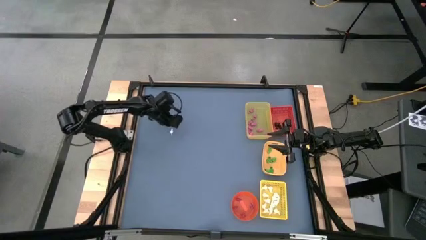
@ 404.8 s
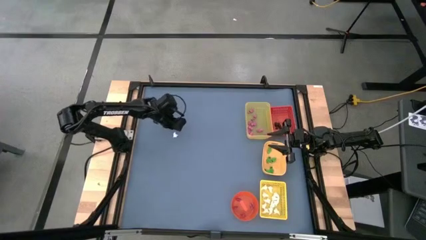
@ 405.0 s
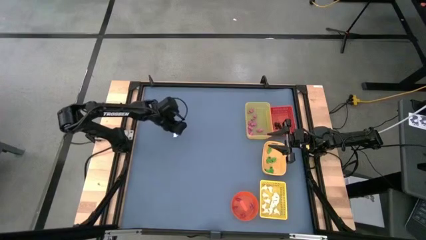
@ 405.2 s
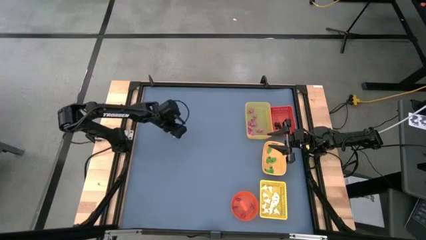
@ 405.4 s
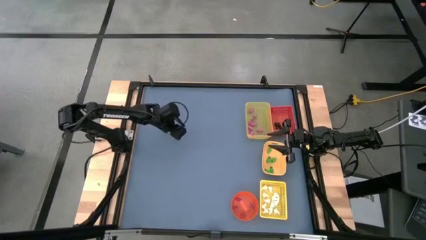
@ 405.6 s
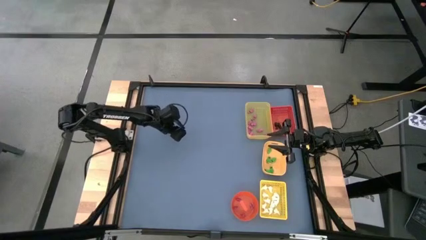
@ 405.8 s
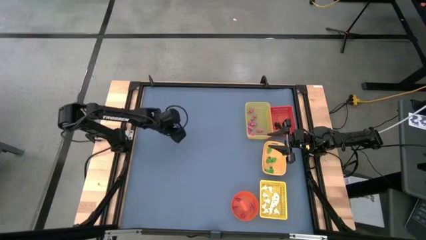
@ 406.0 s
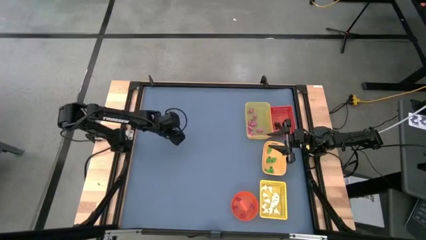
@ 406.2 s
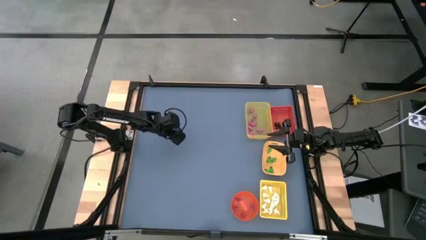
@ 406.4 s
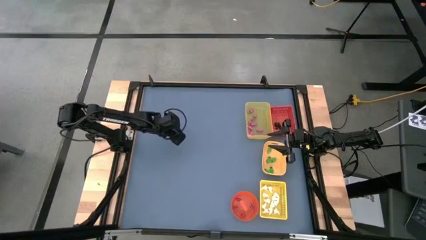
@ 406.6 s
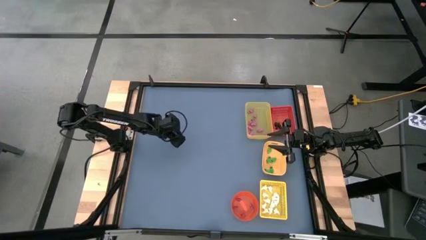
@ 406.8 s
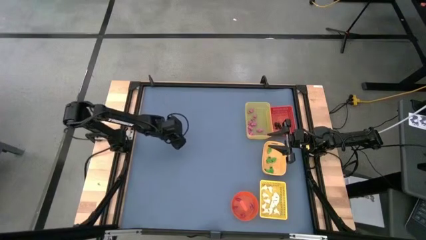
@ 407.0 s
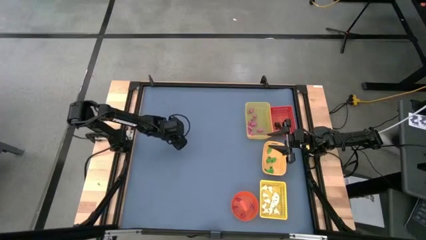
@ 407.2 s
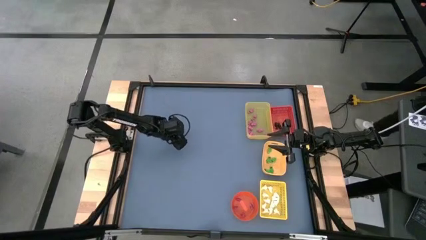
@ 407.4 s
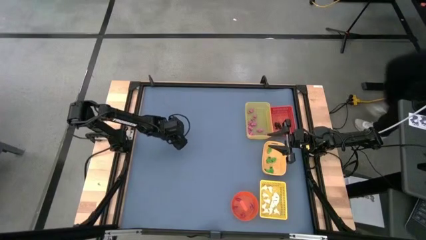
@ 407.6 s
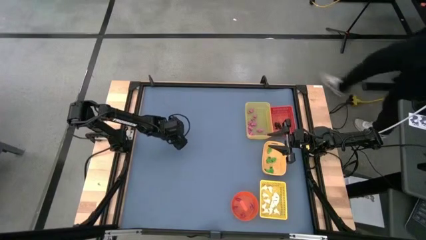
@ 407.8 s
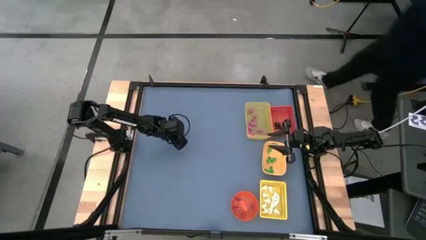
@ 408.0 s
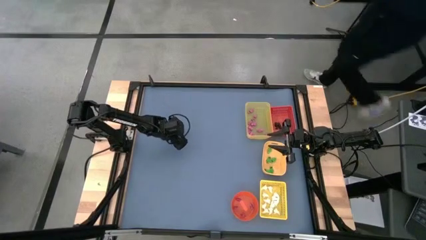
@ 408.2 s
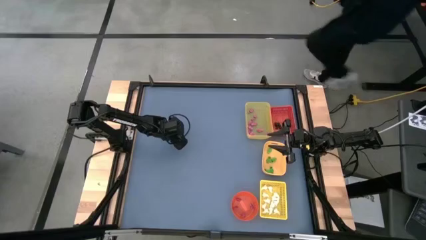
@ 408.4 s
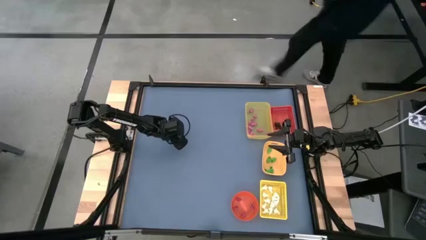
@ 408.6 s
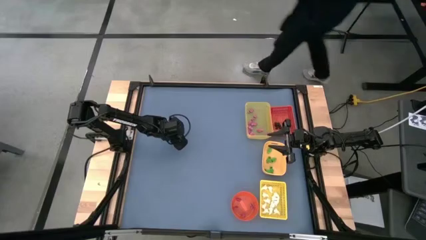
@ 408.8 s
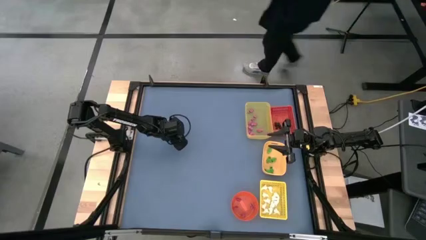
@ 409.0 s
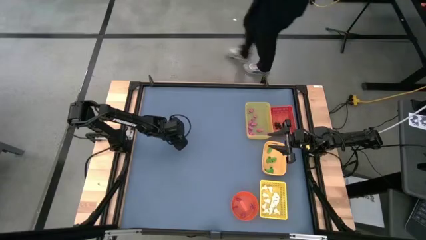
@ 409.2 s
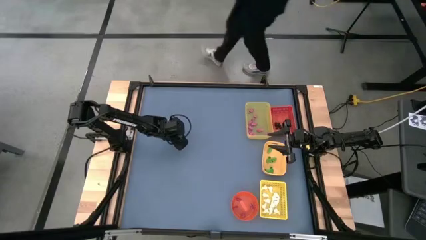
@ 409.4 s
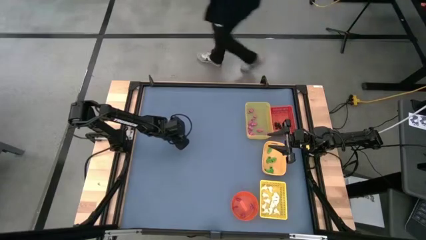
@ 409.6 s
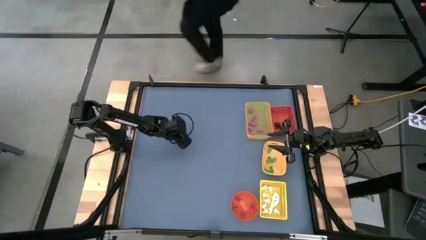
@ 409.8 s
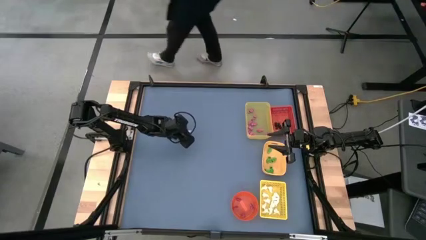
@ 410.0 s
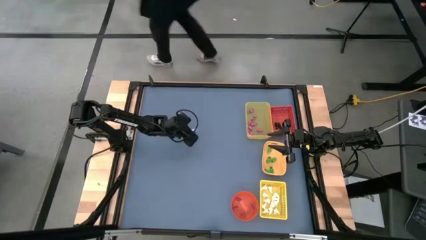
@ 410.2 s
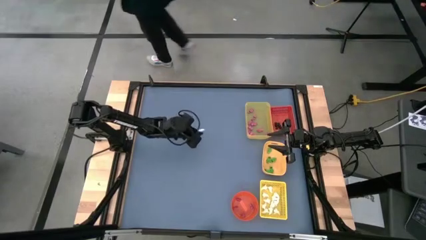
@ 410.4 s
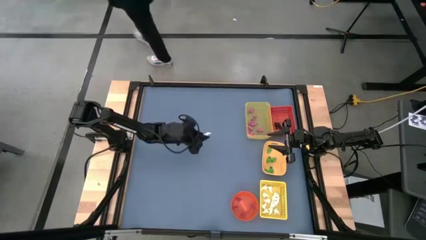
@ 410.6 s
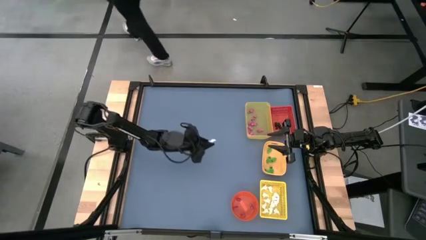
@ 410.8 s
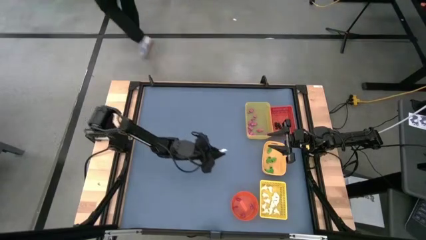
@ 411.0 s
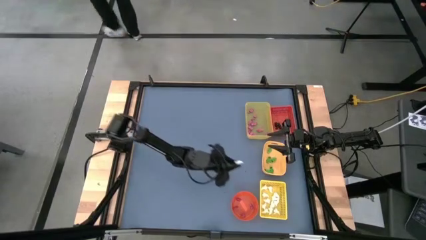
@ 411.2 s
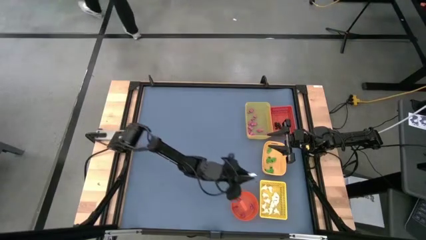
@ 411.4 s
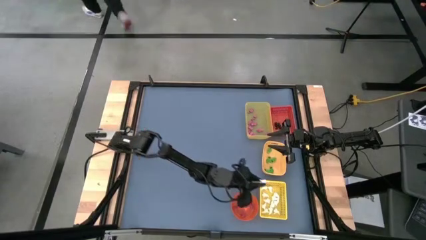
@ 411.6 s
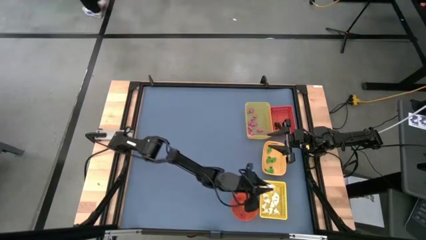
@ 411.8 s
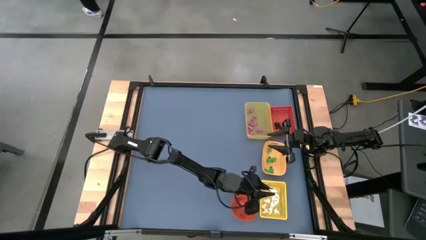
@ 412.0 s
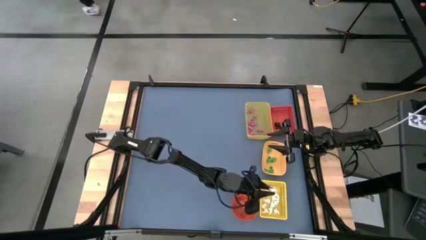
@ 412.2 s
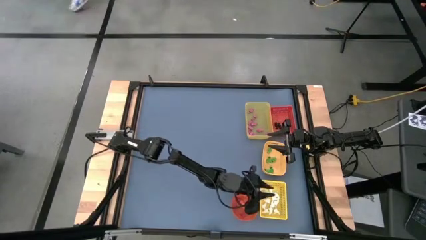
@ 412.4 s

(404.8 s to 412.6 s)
Task: Sort Halloween decoration
Put the white ghost toy into the yellow box

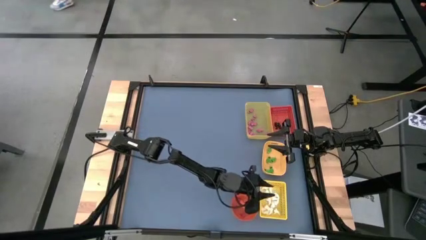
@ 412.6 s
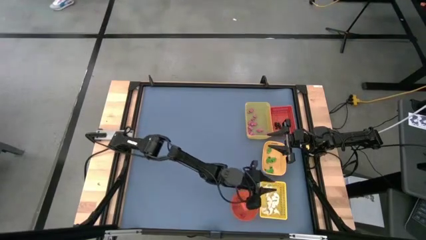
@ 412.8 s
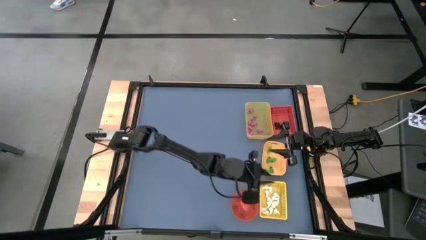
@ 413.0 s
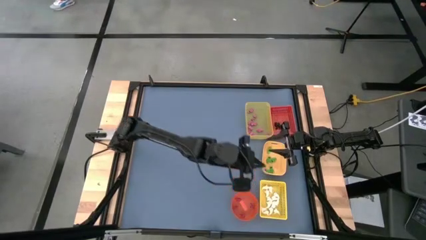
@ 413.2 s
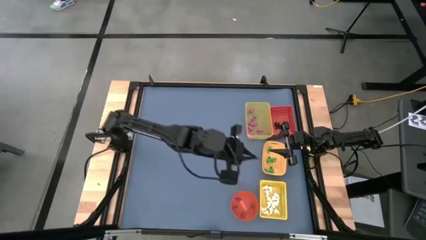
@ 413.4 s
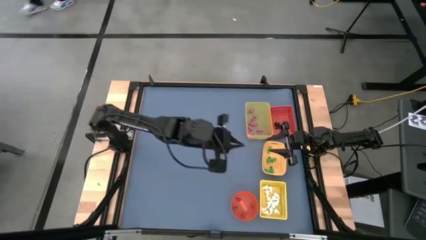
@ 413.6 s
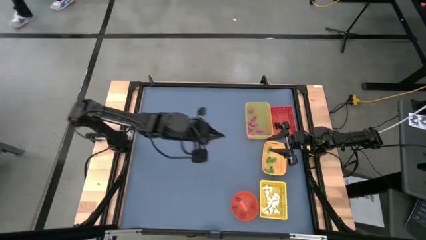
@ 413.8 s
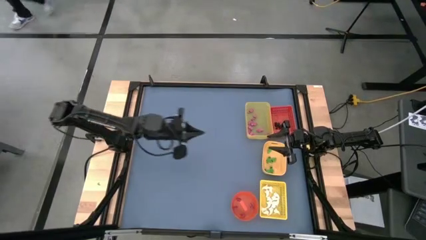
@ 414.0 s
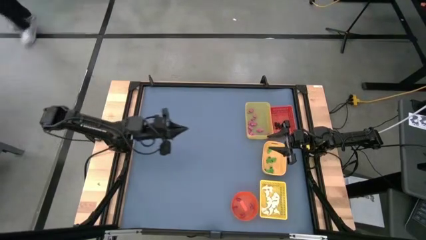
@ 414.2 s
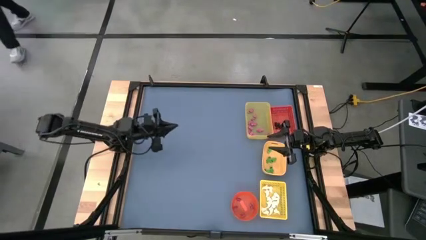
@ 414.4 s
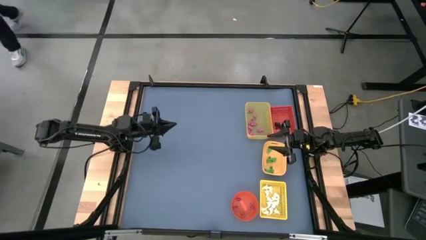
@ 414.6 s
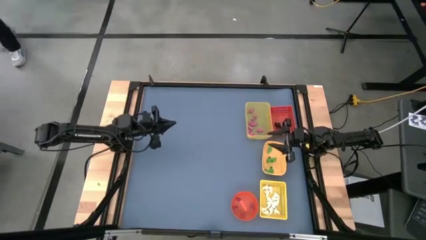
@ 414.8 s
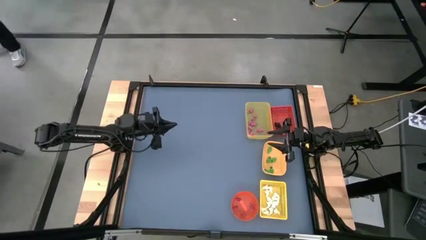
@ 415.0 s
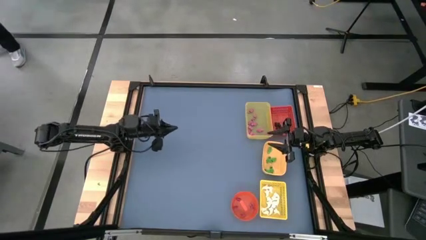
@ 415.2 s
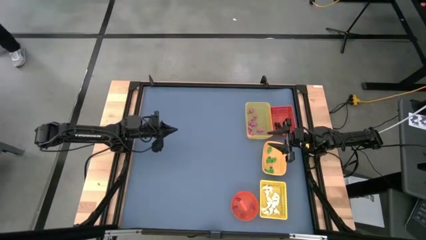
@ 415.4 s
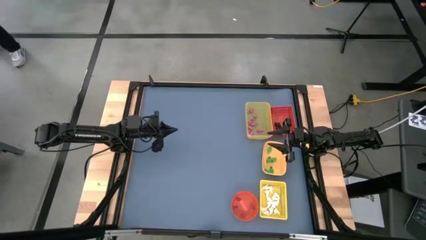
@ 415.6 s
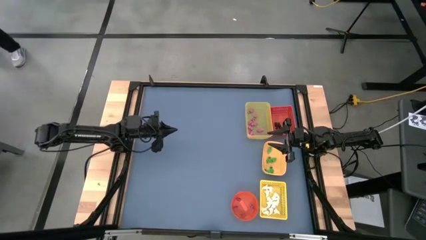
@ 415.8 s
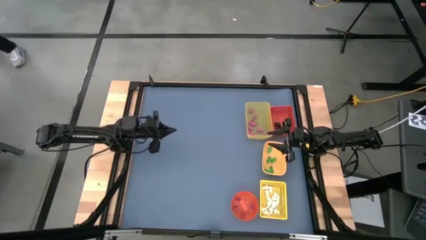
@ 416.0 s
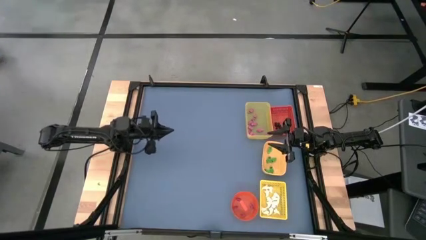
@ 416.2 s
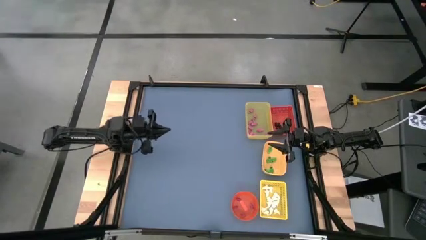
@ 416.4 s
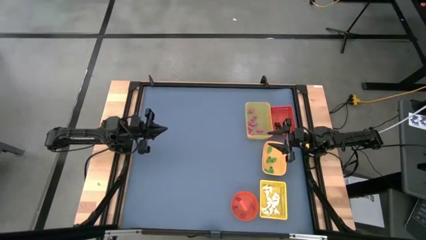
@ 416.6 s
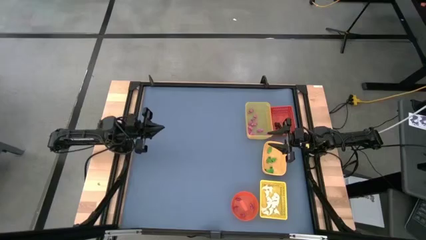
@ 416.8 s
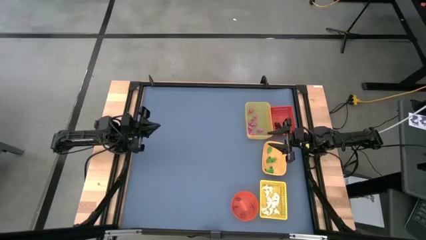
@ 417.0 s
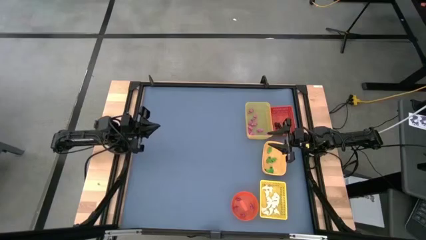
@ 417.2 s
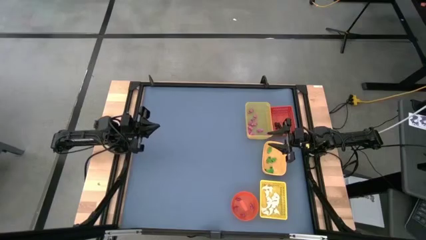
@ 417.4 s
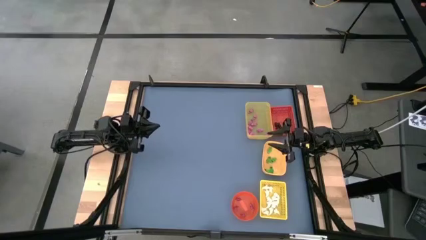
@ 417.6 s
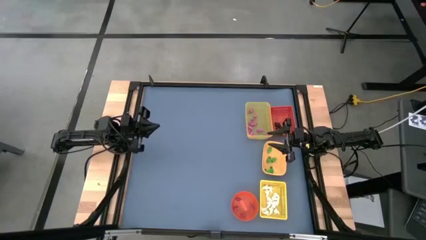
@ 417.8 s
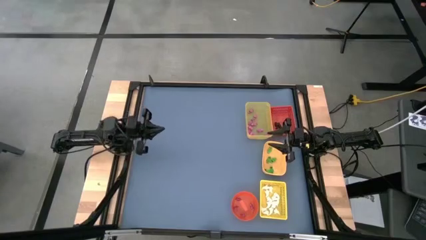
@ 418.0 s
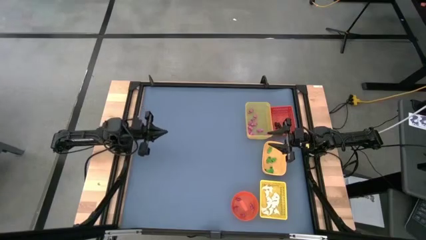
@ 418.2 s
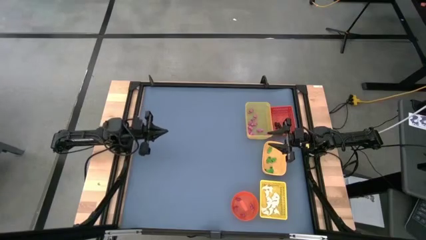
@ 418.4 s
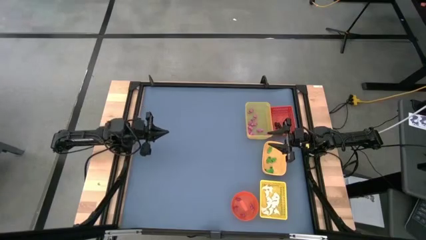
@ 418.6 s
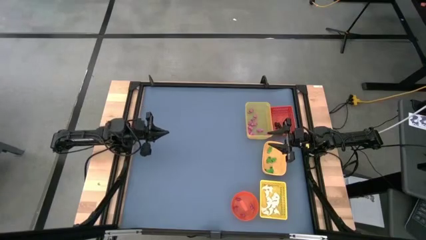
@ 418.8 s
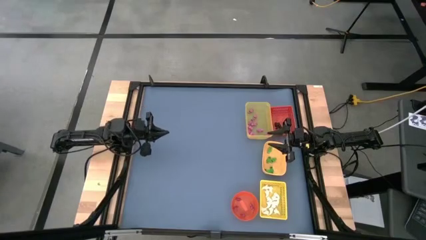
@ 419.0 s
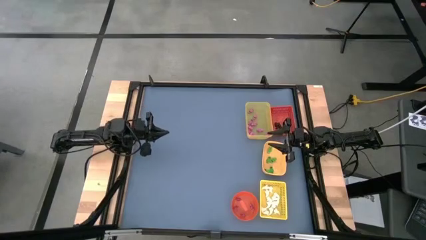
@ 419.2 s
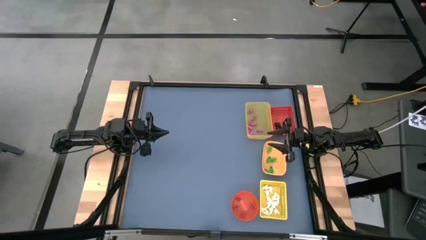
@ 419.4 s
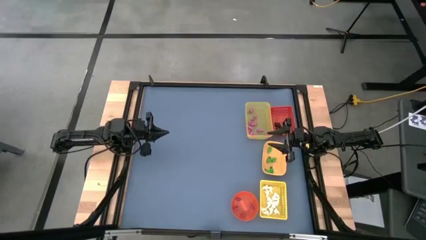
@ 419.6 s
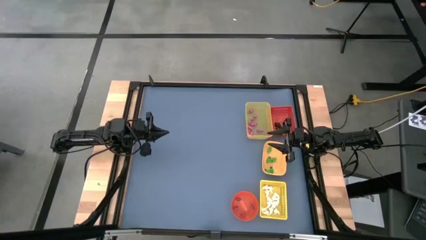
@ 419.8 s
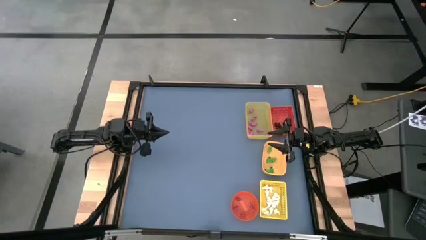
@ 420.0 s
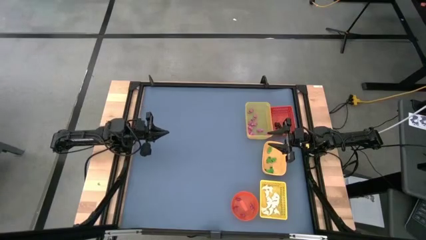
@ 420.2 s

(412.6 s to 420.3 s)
Return to Home Position
